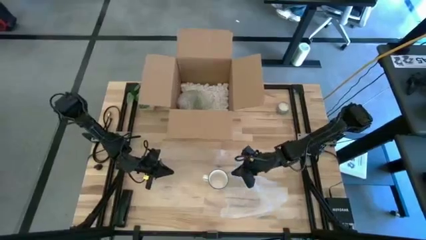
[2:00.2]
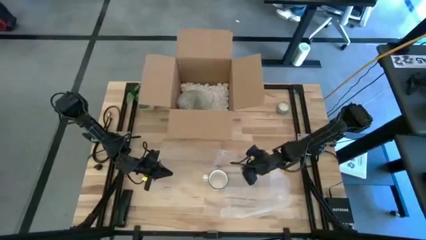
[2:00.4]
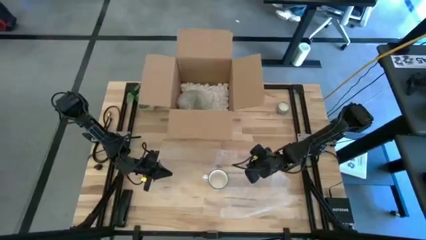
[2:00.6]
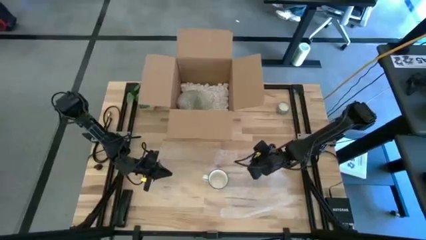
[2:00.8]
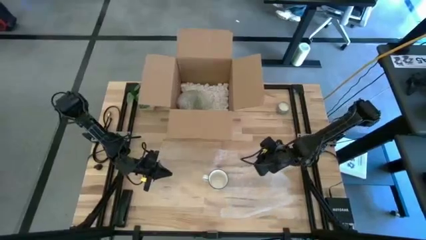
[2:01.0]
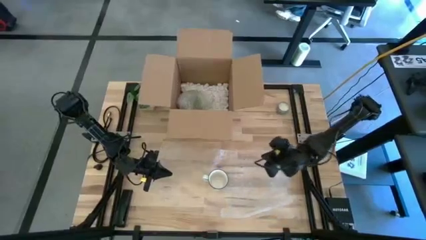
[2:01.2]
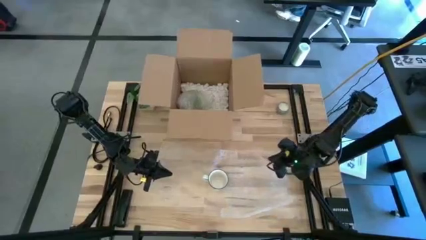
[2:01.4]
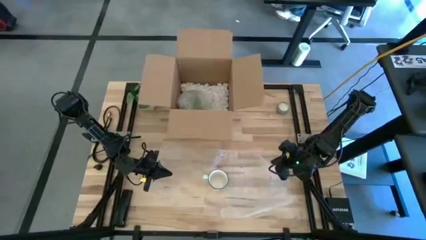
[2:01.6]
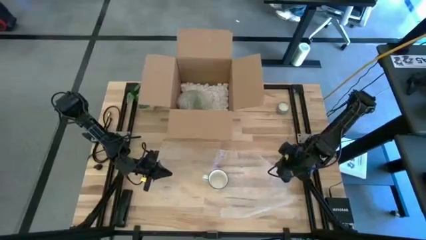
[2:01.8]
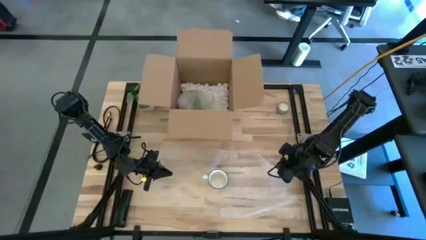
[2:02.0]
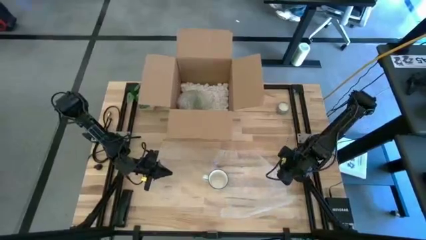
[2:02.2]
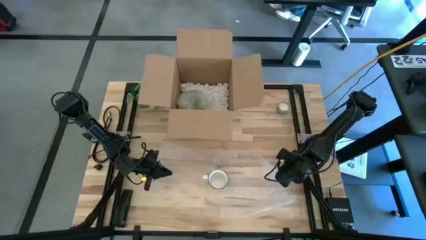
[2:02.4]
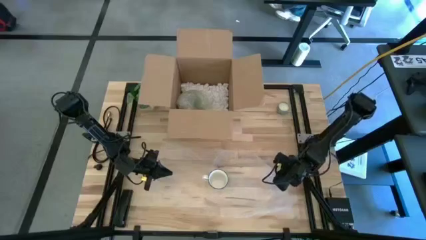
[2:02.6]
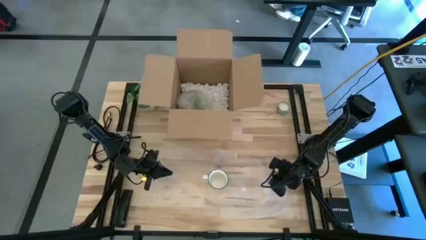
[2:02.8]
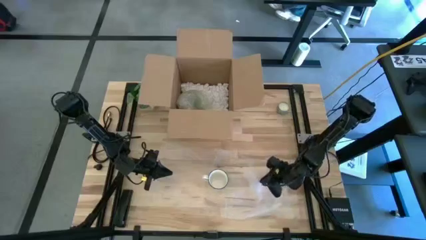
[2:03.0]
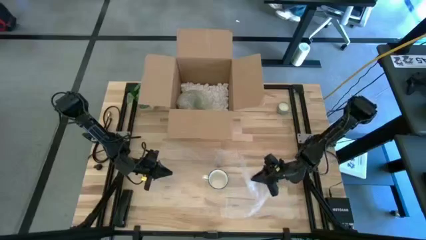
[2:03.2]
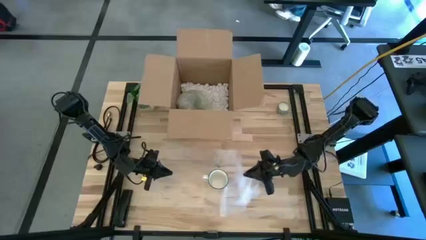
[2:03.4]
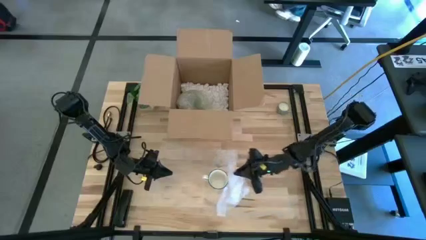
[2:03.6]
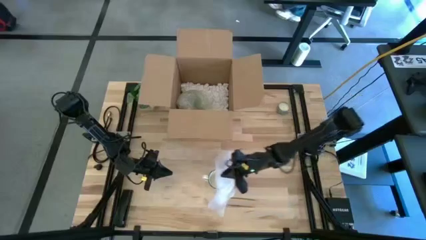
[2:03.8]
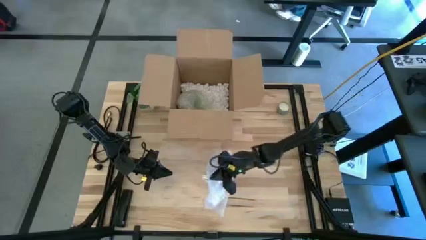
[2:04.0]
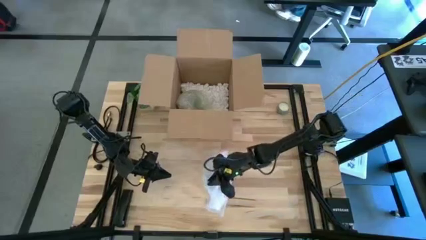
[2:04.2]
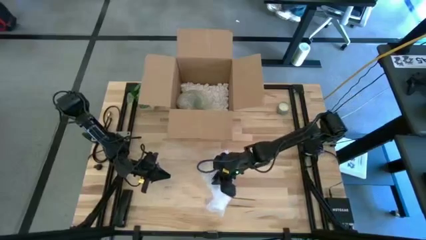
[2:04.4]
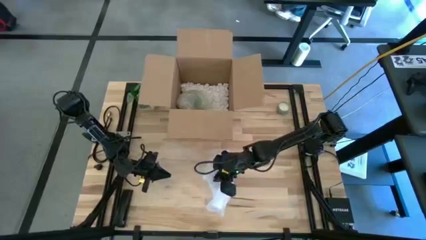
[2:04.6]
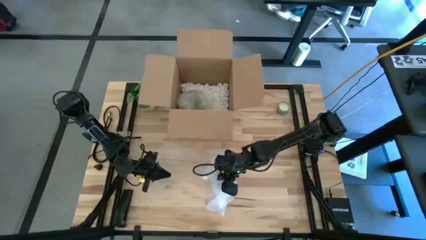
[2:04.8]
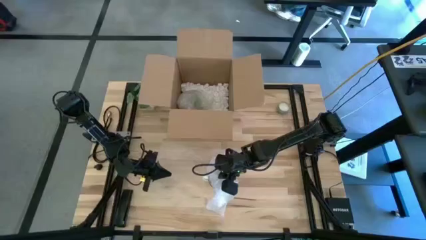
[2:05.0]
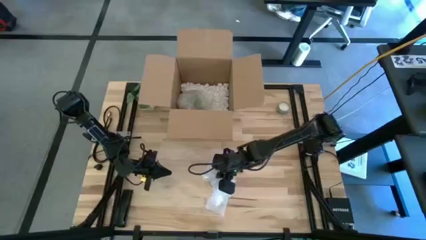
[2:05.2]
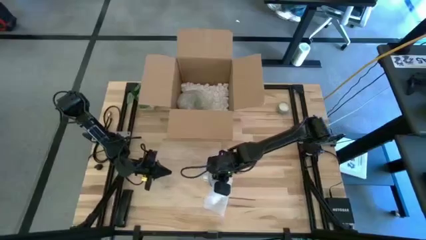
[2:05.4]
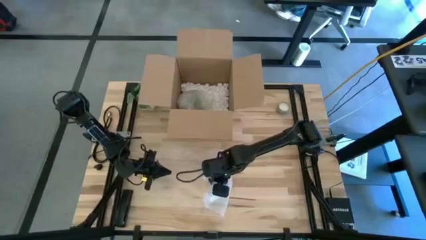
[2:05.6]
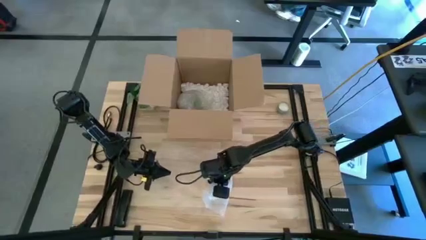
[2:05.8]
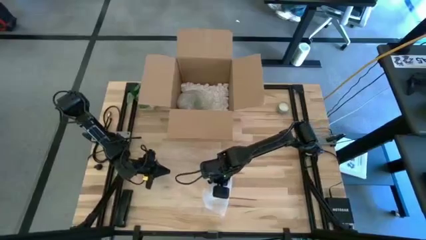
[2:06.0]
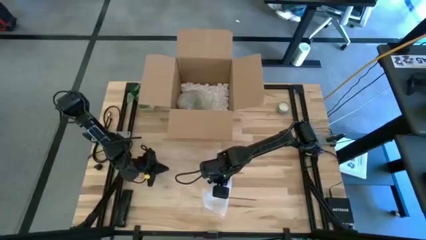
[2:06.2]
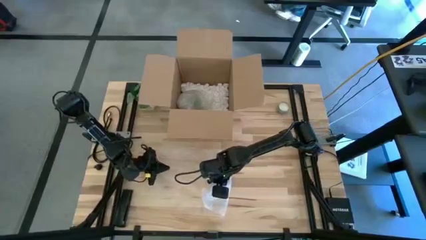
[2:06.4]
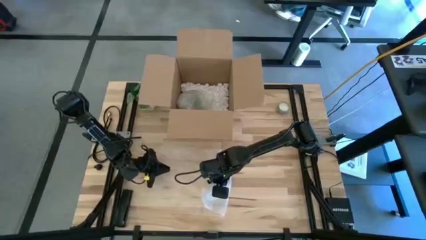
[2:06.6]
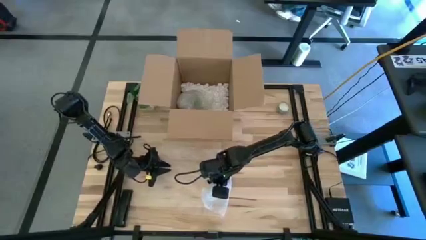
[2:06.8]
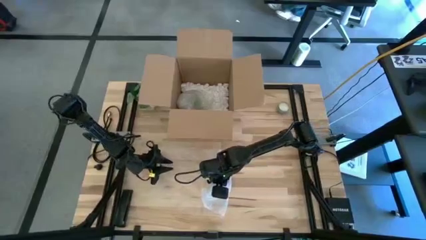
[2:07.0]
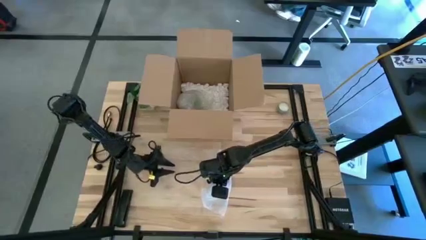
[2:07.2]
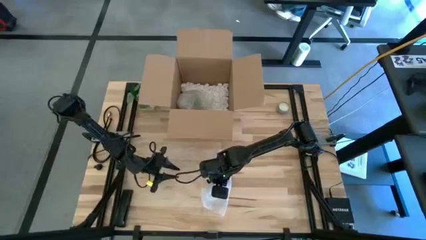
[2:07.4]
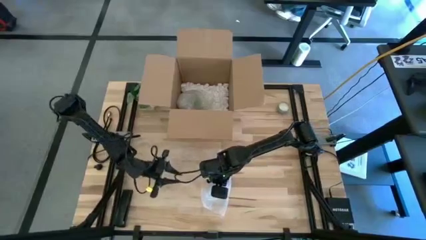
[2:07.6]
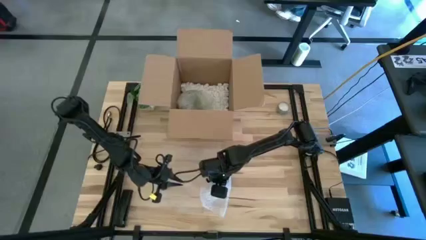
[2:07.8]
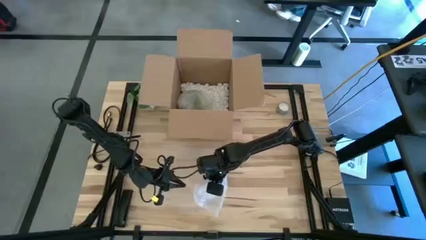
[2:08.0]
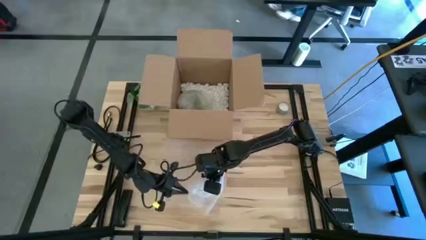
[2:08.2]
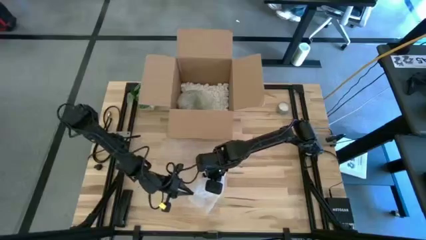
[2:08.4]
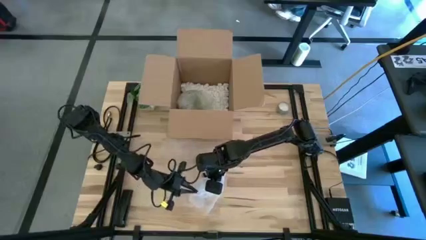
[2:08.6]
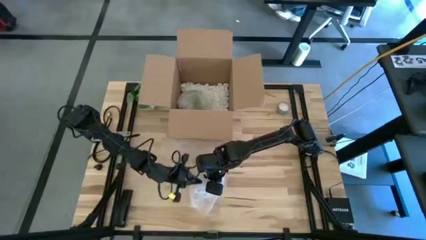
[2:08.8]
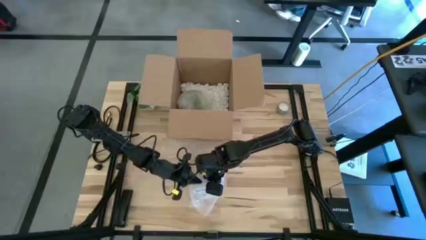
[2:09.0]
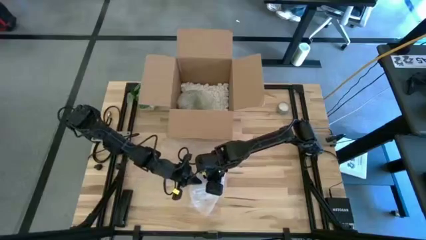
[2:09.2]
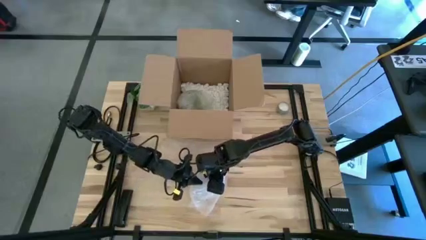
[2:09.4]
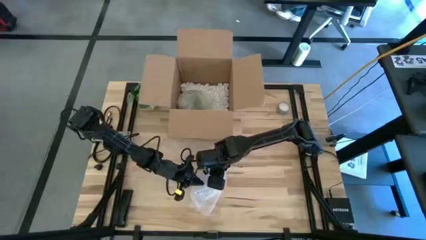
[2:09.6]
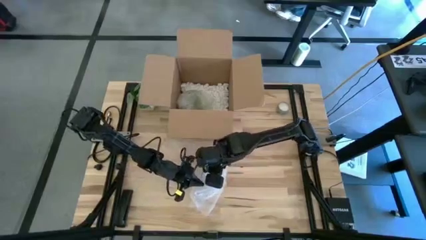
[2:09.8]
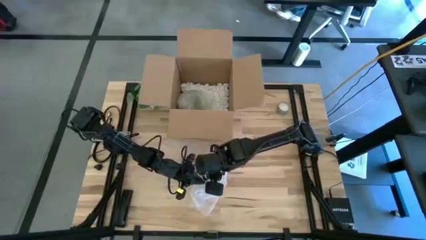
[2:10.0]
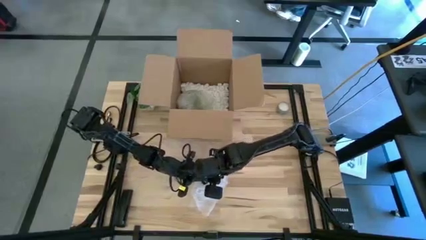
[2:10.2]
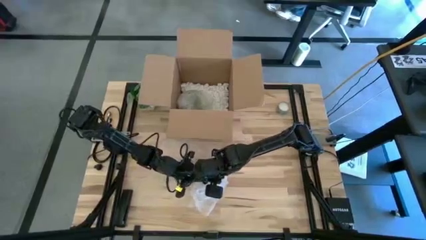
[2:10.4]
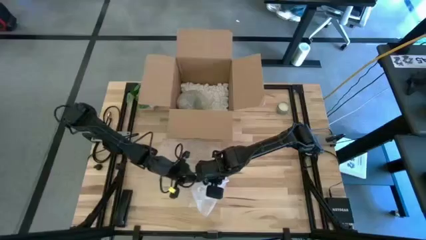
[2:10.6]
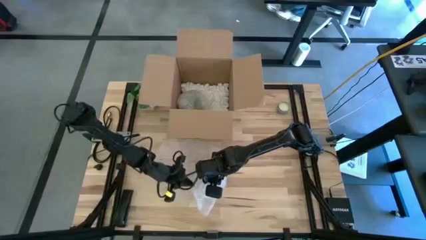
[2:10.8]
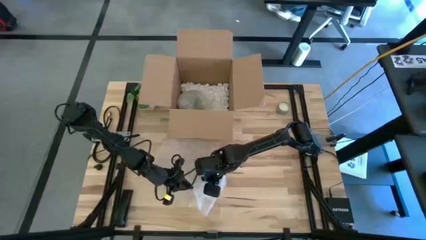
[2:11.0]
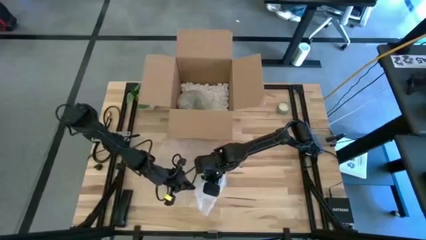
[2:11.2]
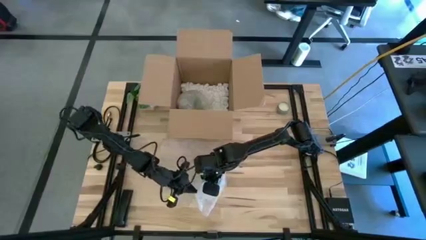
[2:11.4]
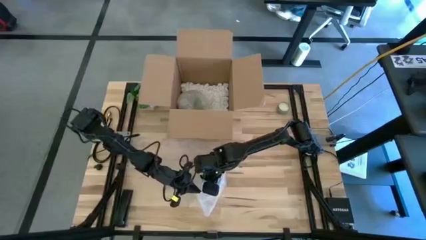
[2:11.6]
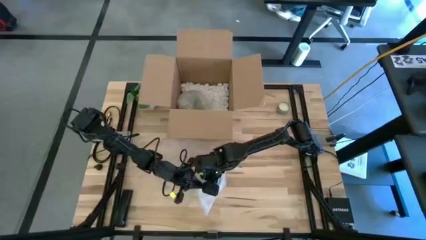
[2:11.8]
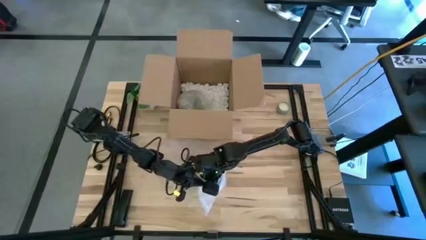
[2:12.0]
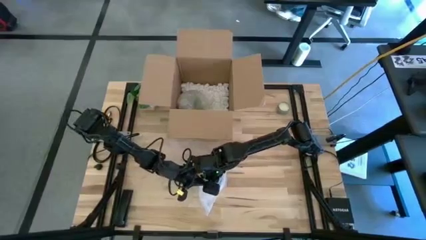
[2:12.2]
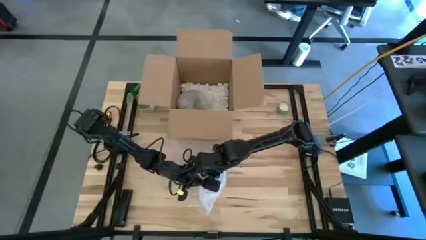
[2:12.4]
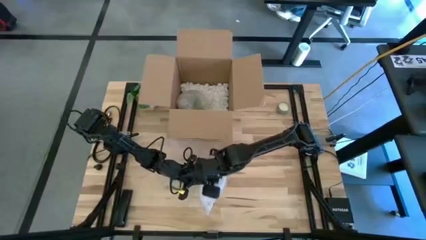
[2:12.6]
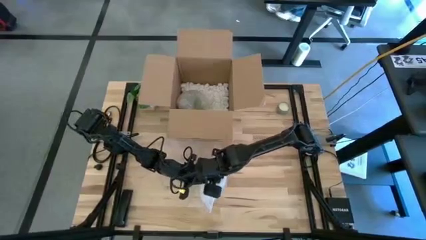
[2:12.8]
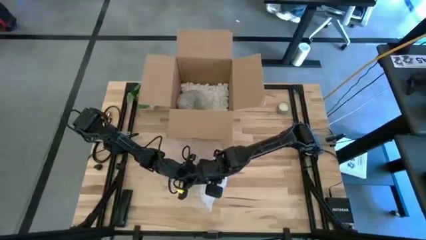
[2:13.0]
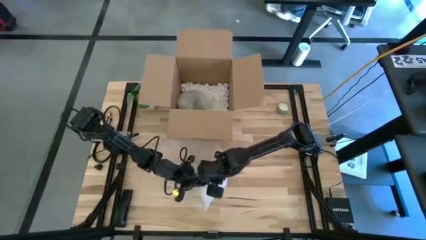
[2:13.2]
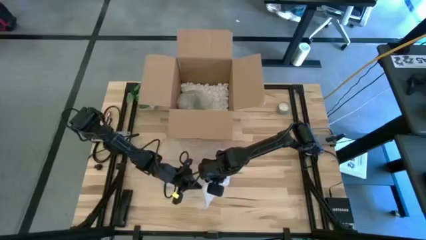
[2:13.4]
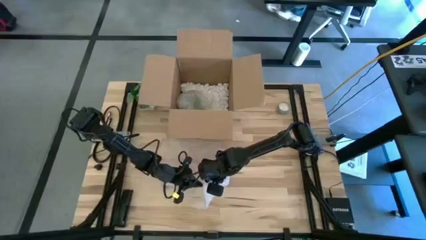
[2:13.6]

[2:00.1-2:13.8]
Task: wrap mug
Wrap the blue mug with the bubble wrap

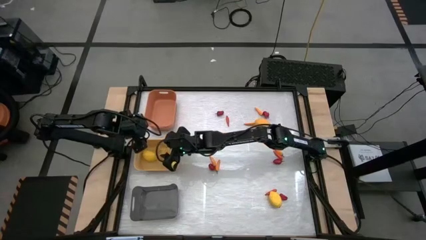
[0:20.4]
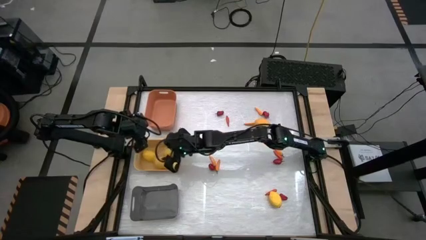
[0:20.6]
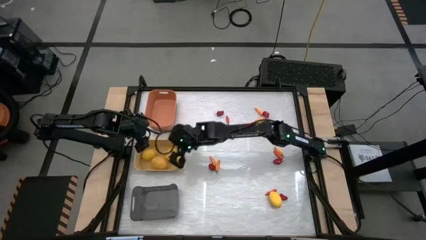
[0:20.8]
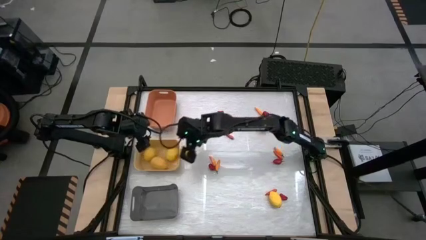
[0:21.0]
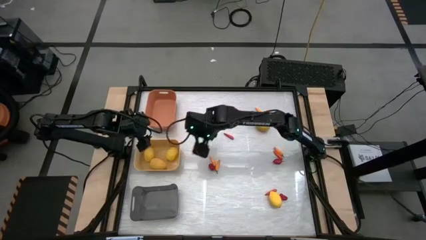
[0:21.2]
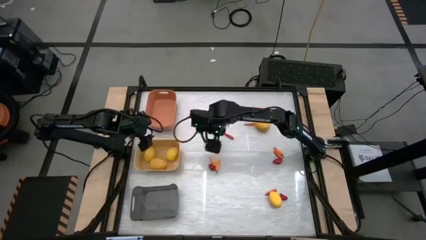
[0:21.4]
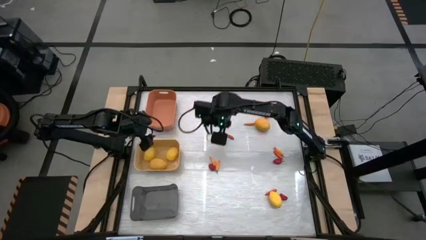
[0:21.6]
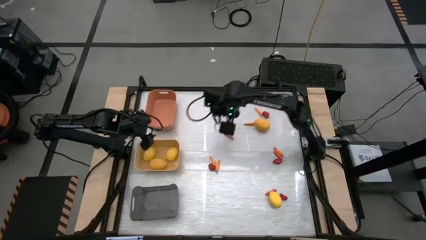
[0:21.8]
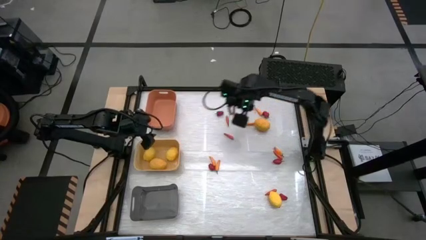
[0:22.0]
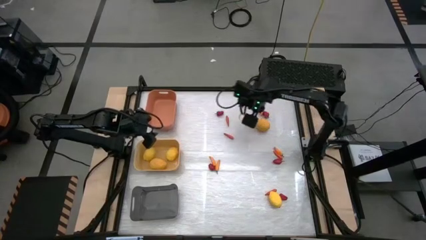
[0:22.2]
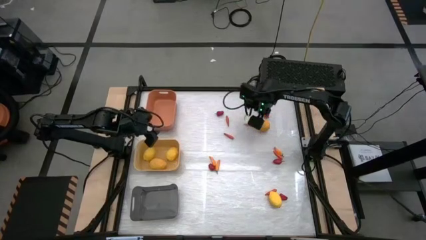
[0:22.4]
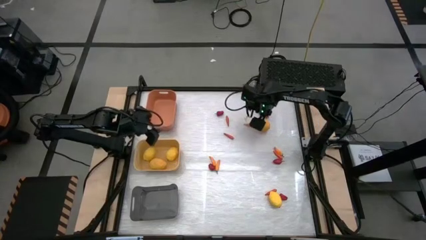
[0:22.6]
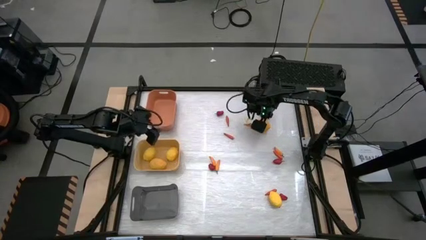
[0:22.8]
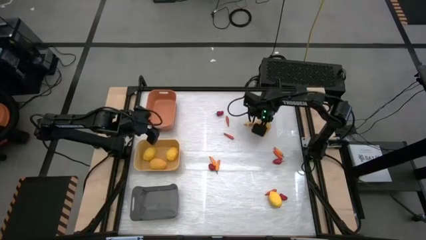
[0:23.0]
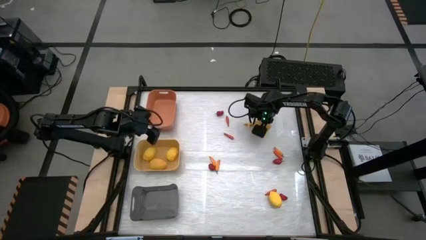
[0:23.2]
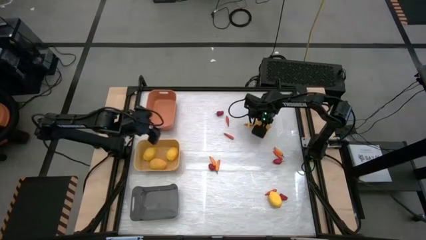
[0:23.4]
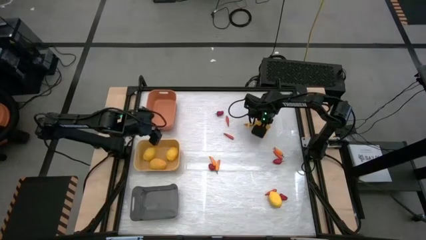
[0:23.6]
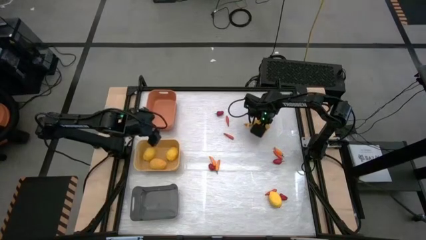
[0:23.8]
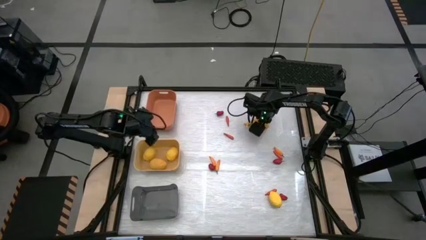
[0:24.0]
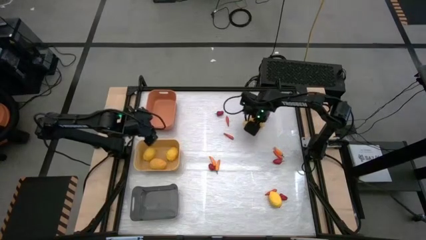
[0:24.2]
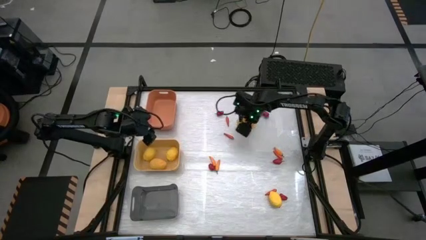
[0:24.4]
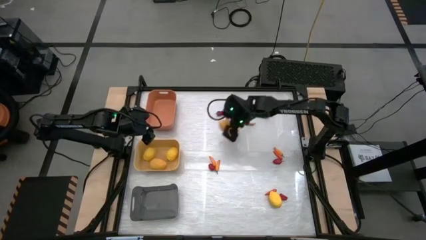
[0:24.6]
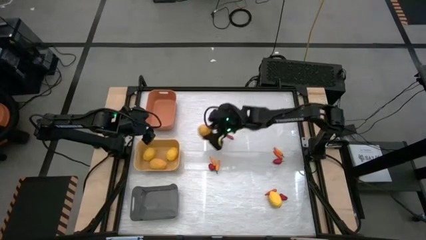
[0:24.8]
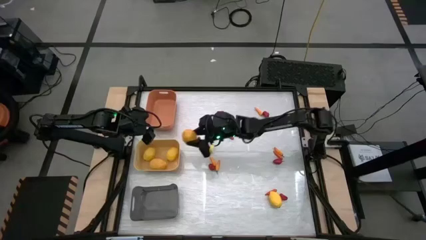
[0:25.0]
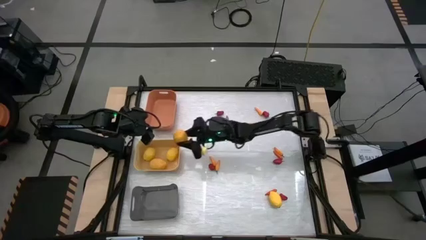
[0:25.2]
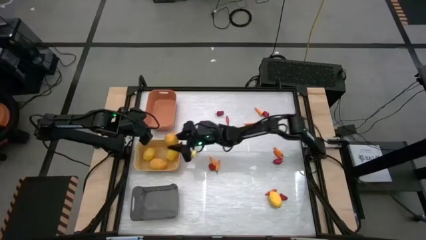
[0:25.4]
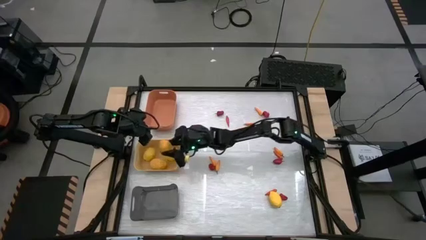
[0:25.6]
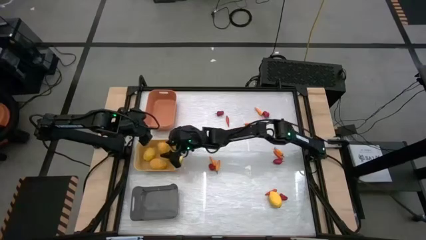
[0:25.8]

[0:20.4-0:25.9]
Task: Sort produce into baskets
Put the yellow lemon into the yellow bin
